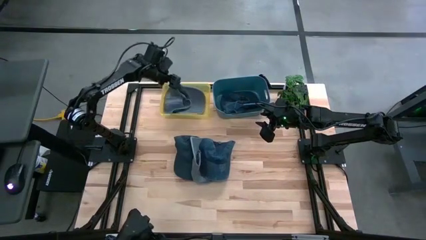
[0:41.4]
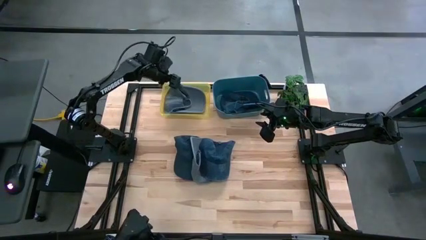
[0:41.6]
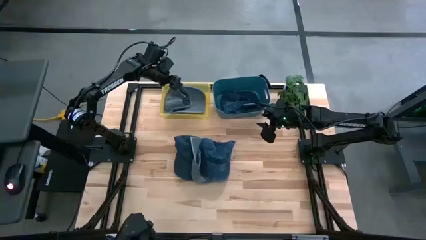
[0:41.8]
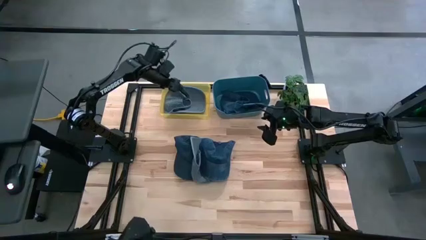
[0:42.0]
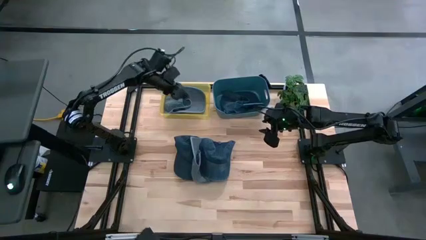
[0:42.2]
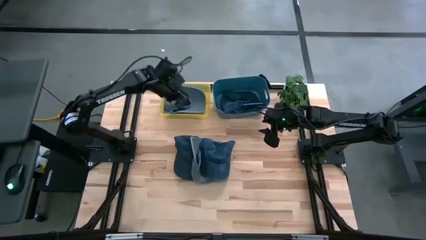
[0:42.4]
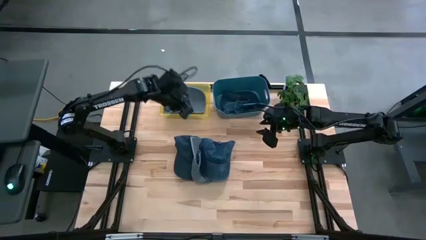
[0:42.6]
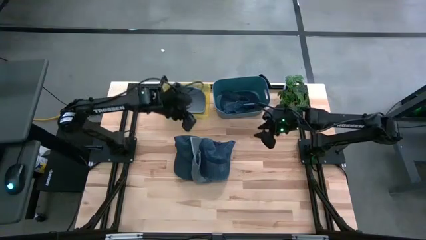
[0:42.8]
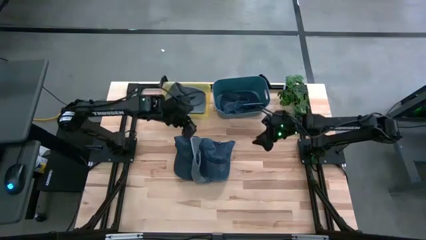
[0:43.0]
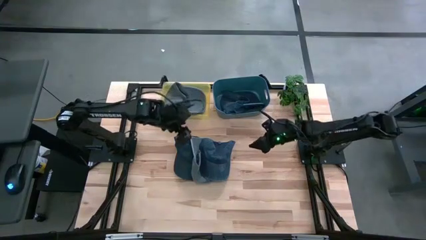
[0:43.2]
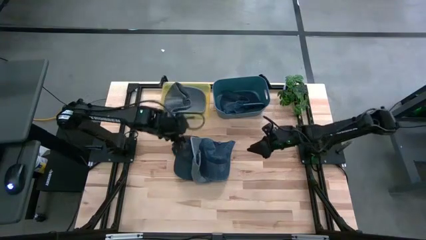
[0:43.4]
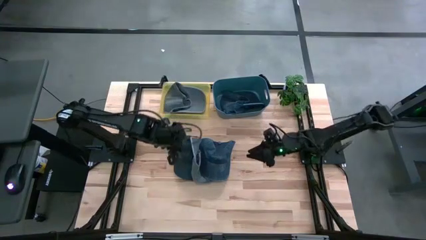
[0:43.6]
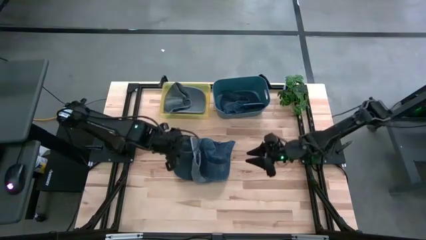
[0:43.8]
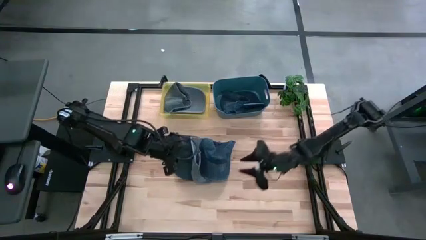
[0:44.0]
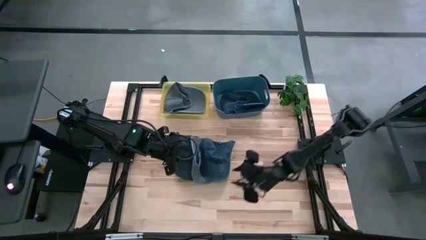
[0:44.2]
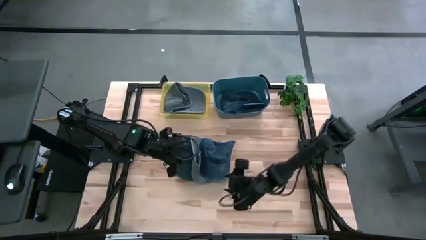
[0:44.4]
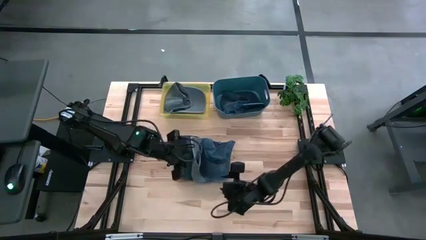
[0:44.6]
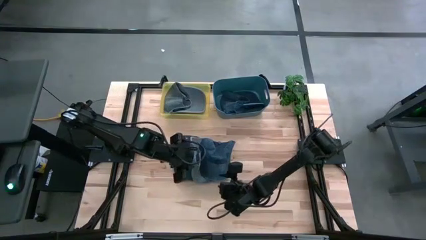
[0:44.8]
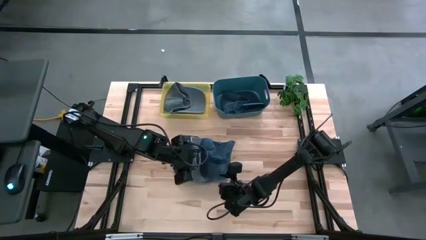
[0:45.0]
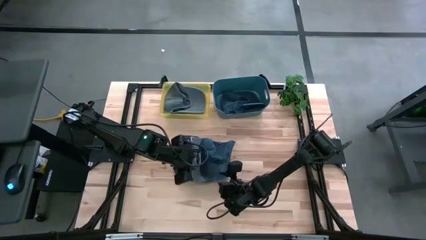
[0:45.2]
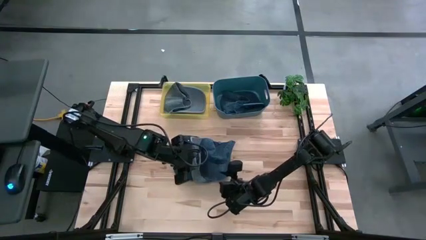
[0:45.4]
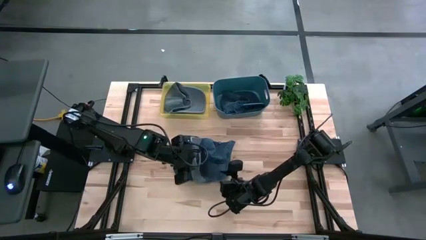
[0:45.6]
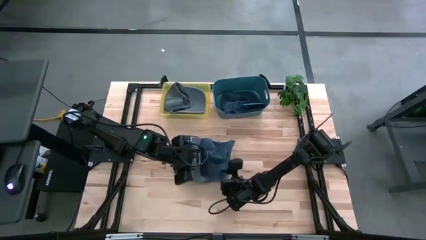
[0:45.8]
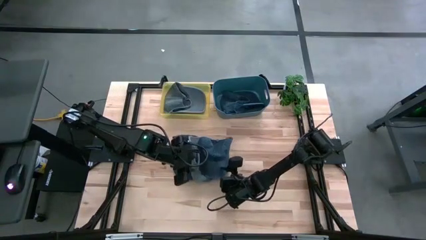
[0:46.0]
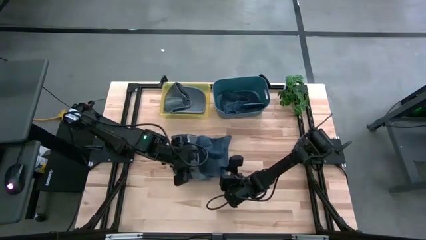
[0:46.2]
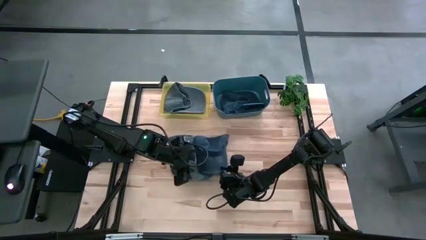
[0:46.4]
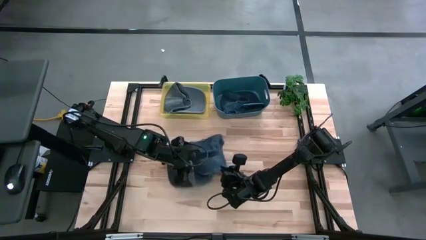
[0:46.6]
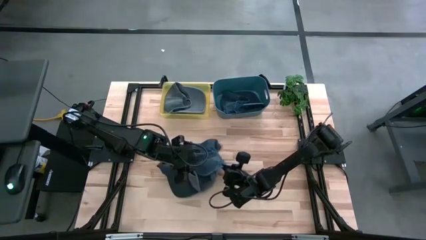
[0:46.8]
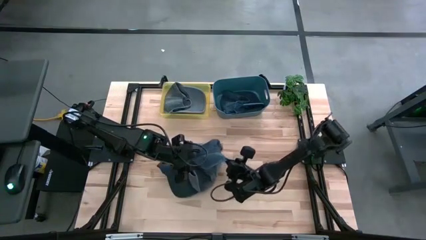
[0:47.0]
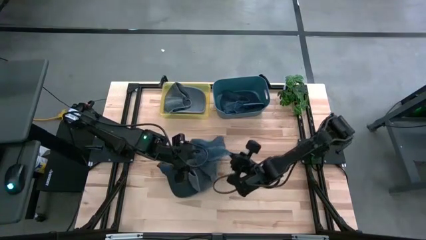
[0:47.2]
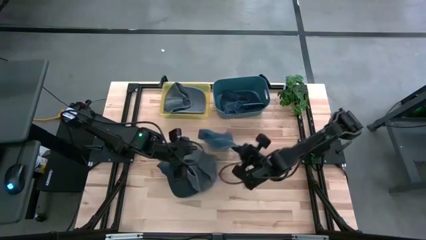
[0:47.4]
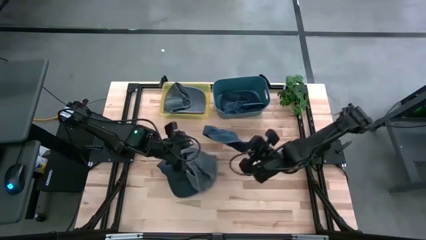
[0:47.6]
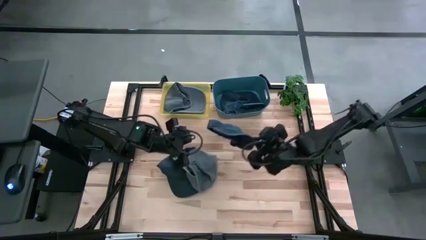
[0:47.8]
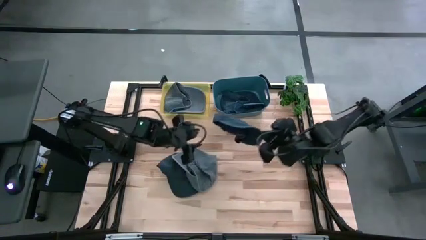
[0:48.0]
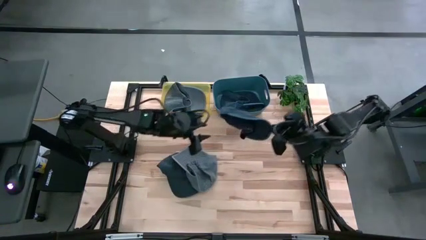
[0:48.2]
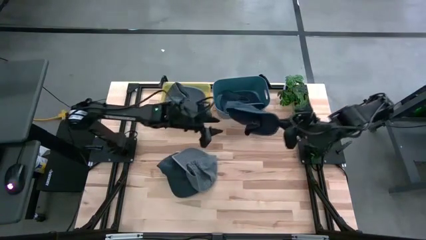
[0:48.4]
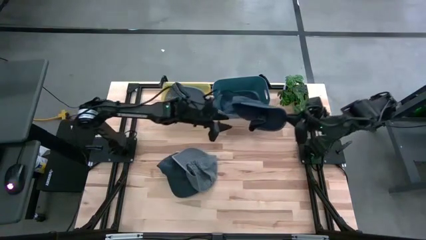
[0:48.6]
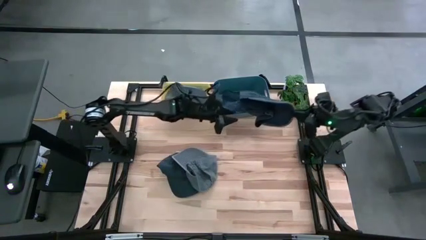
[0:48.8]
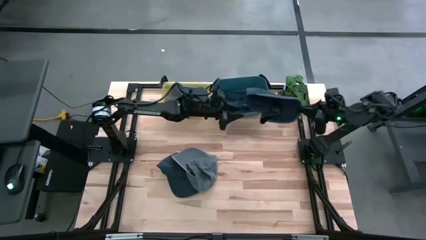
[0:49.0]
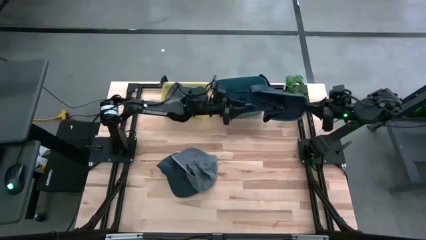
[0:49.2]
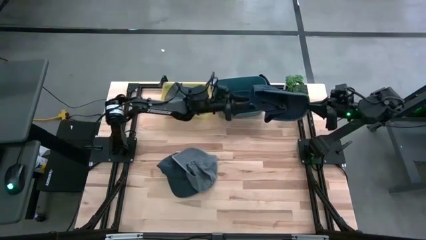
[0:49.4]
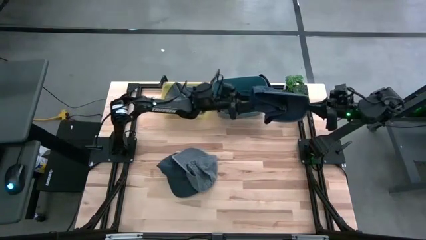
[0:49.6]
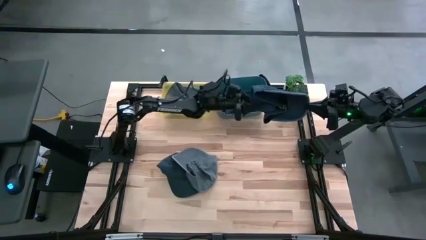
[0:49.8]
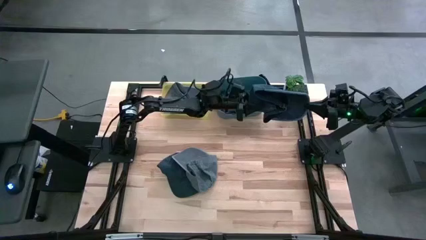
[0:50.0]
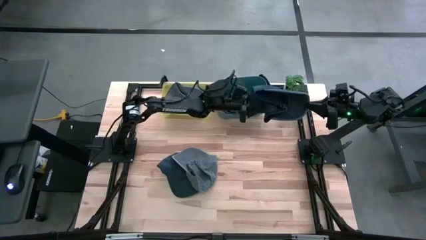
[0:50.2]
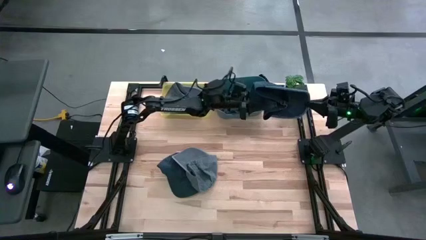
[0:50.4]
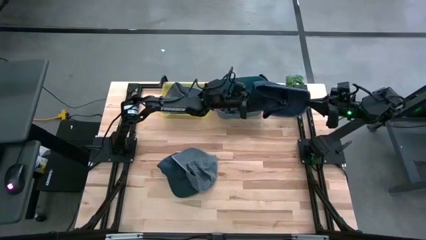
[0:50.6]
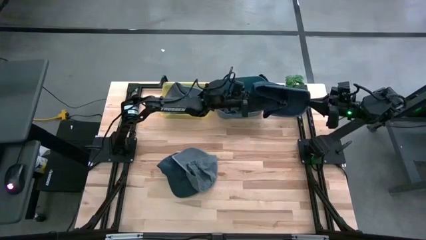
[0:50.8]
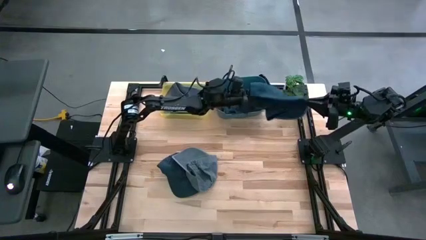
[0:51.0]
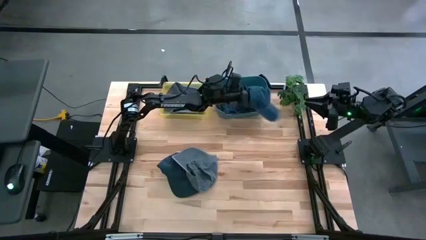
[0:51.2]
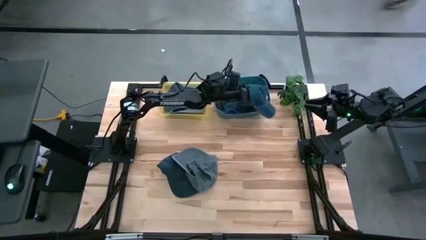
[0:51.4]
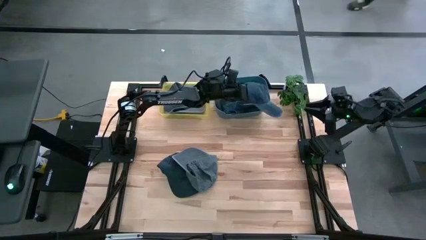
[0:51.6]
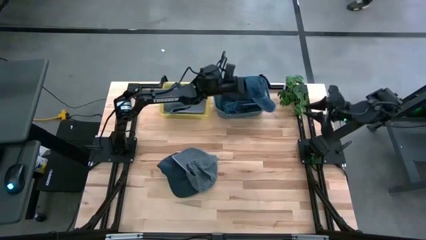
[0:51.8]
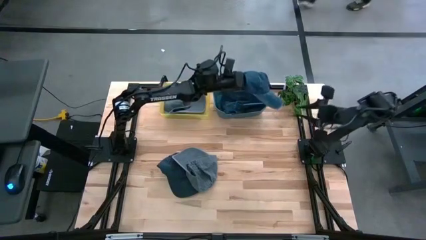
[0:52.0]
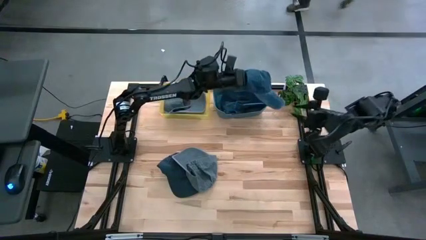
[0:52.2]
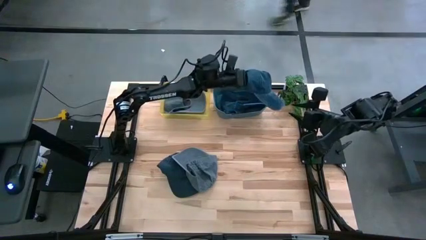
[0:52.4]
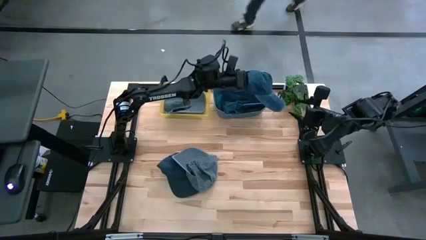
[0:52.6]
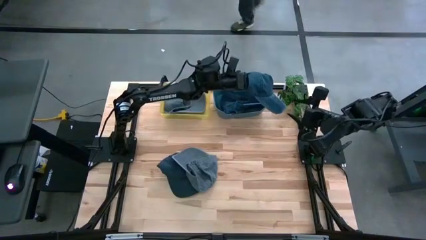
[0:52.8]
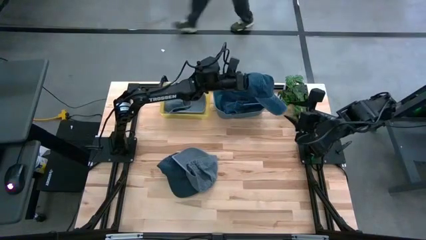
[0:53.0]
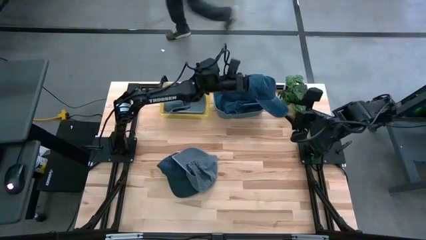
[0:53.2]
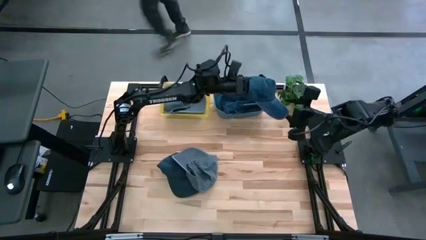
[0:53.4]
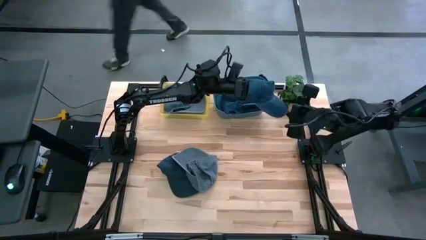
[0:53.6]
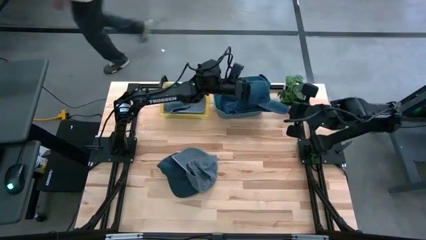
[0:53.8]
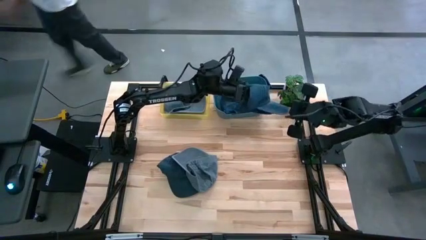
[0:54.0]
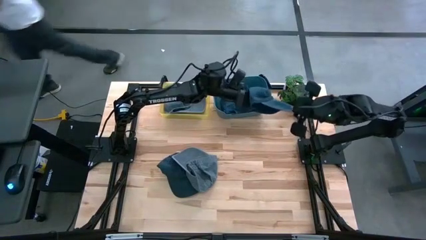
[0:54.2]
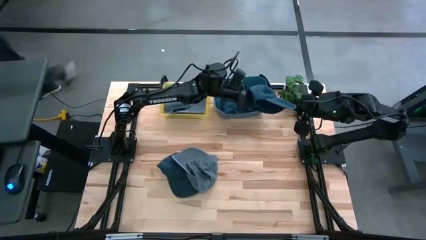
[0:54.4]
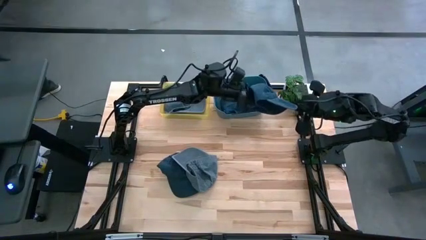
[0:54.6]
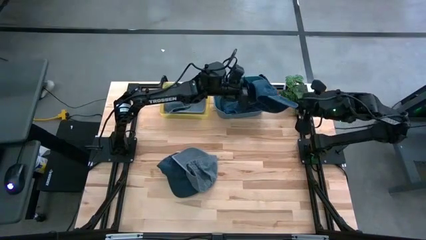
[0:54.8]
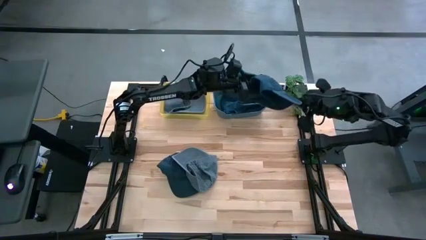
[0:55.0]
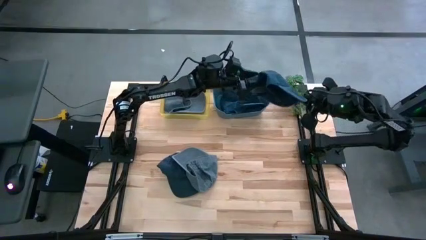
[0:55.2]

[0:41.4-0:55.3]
Task: Pick & Place hat
Put the right blue cap into the blue bin

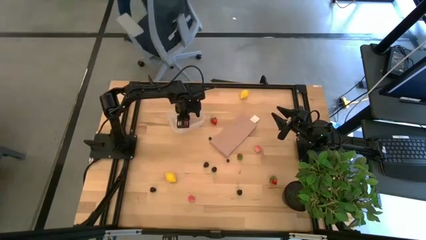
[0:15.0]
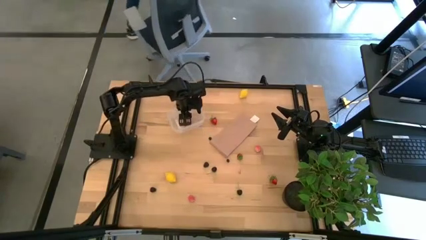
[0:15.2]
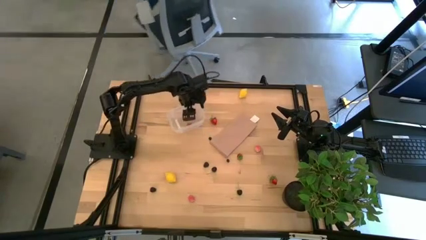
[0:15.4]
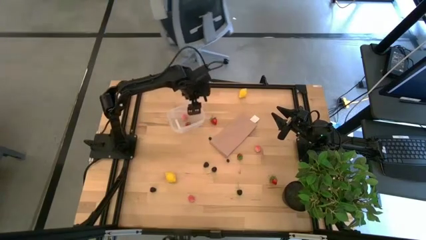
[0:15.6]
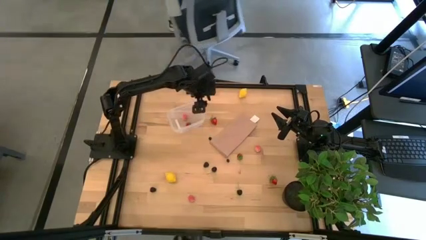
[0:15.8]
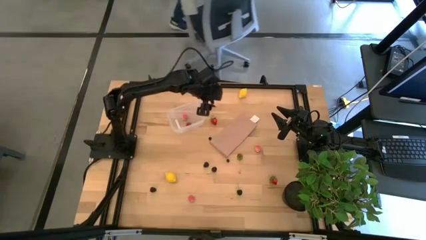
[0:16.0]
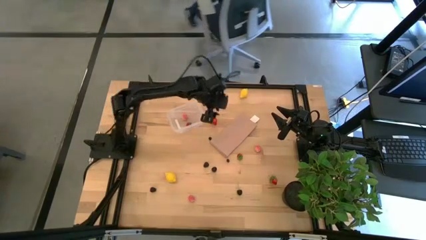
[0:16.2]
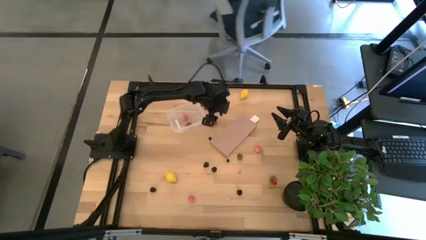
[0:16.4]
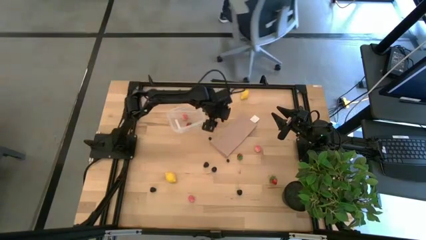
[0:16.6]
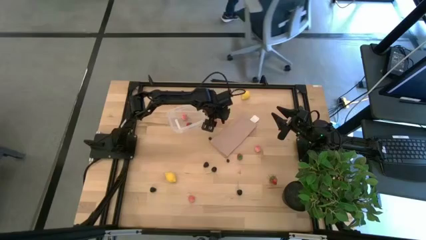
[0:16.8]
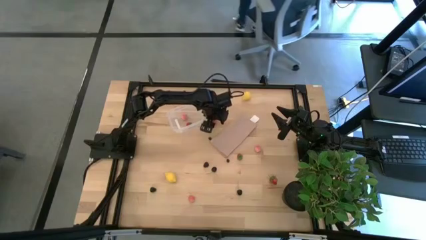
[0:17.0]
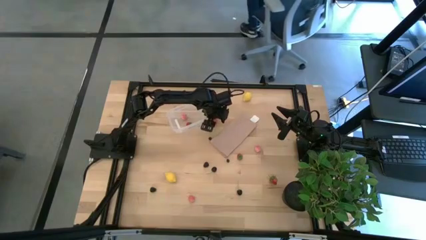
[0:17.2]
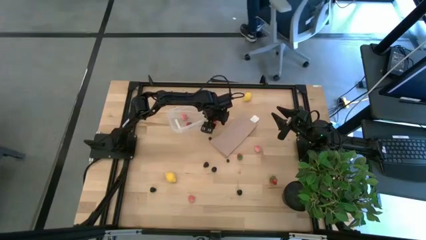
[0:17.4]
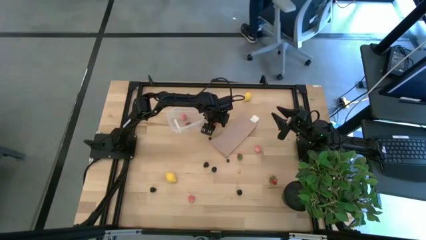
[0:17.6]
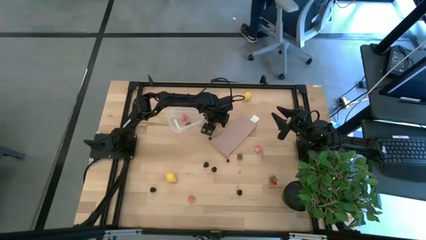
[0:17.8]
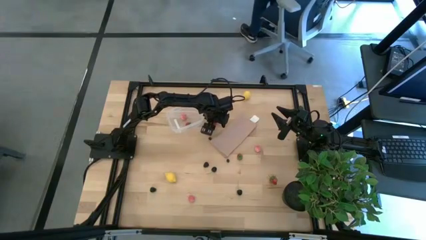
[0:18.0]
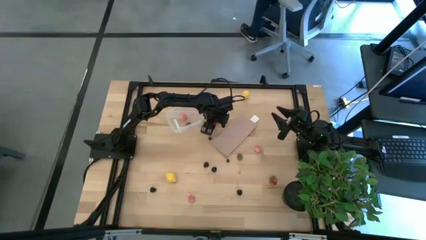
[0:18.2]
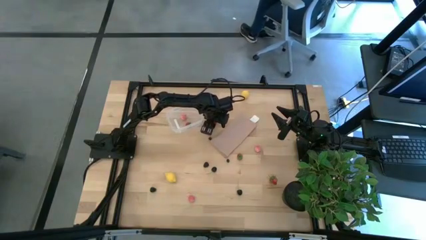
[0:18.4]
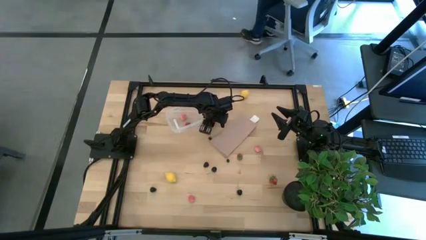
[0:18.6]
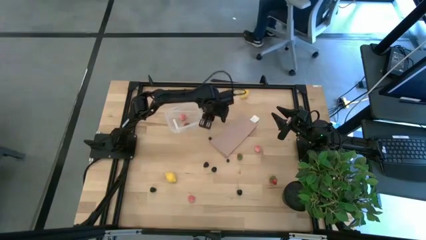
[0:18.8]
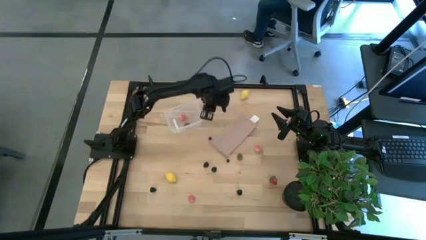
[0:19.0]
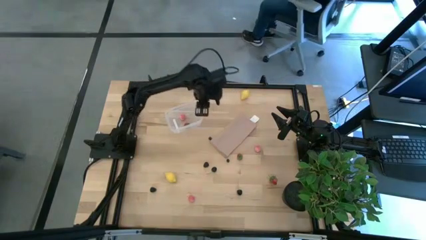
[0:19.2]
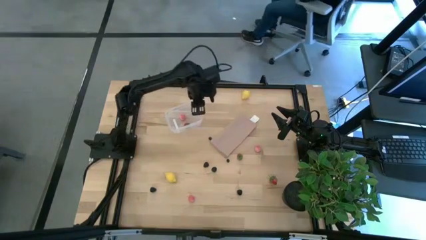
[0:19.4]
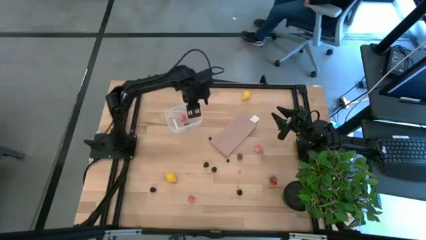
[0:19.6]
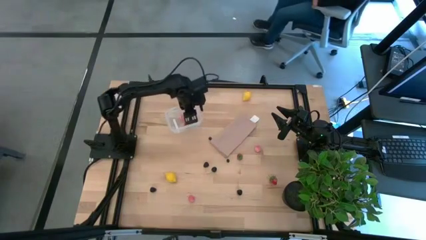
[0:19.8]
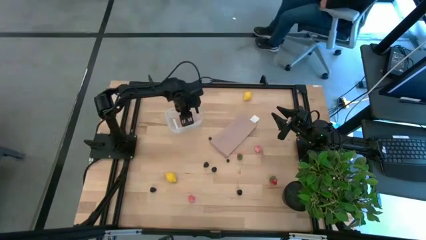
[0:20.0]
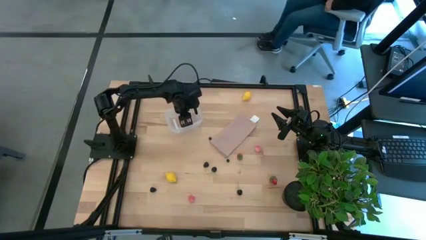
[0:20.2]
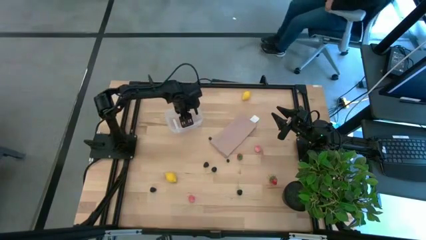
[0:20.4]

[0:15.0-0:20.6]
Task: Pick and placing Produce into tupperware
Put the strawberry into the transparent bin
